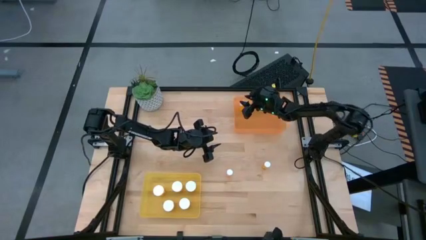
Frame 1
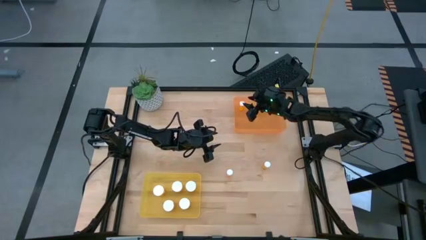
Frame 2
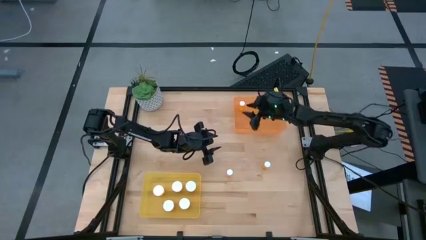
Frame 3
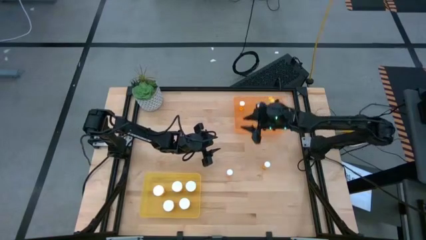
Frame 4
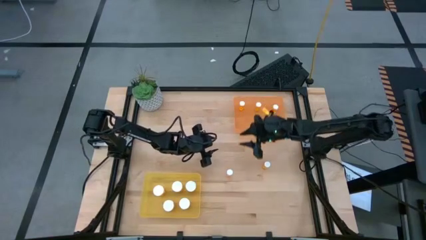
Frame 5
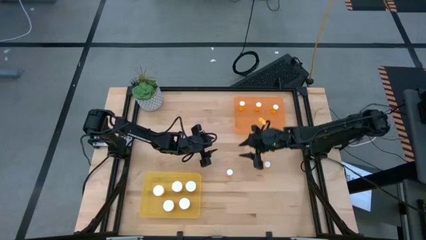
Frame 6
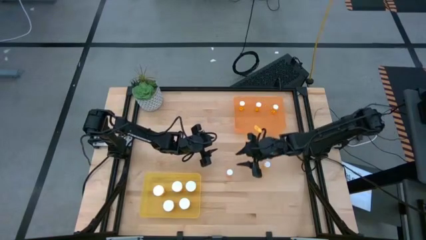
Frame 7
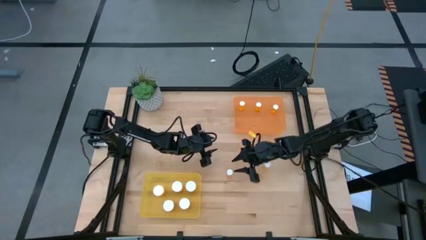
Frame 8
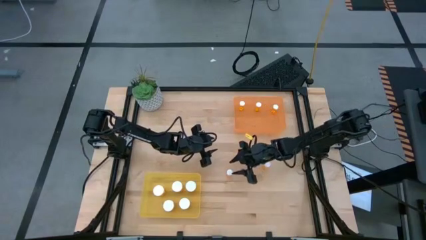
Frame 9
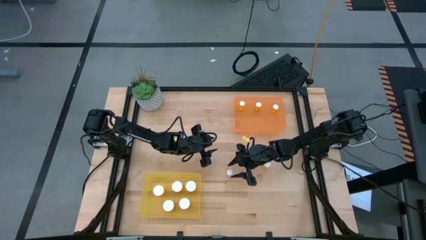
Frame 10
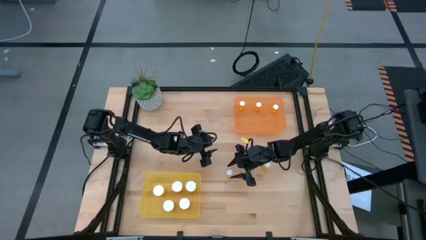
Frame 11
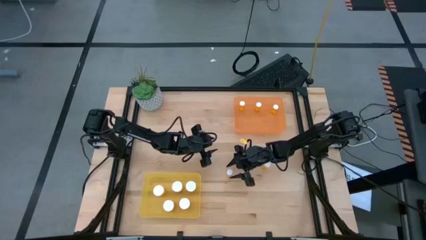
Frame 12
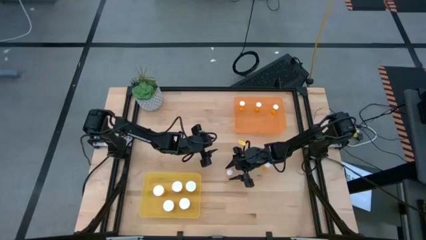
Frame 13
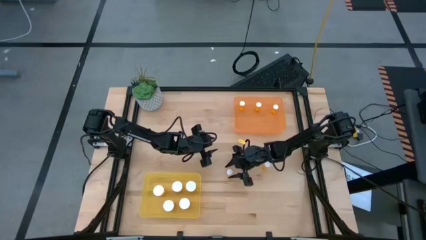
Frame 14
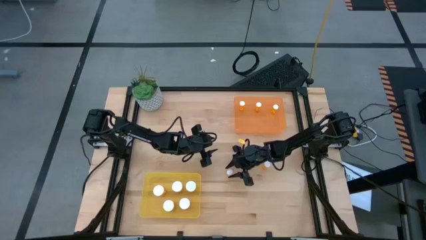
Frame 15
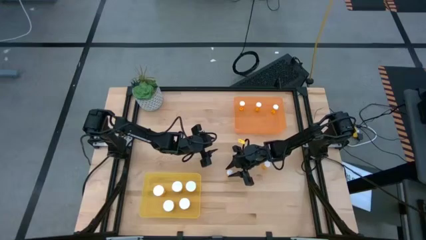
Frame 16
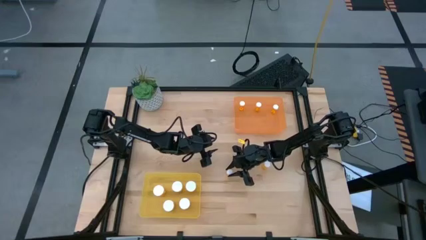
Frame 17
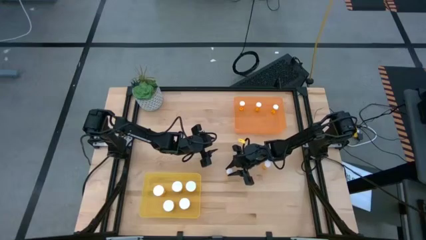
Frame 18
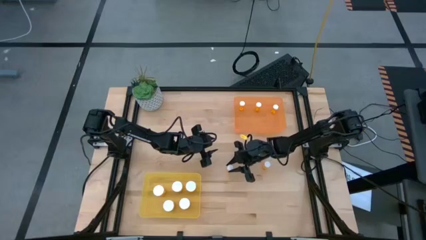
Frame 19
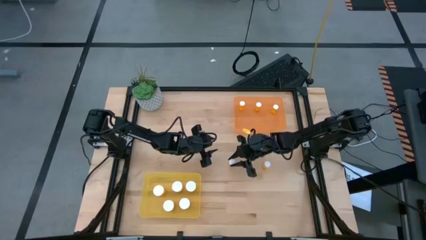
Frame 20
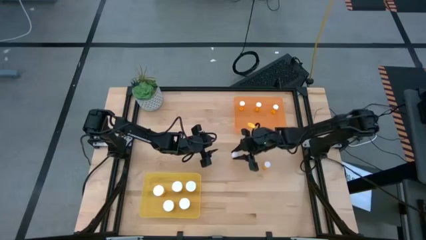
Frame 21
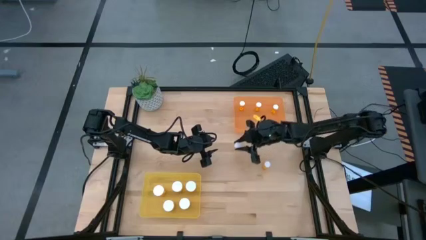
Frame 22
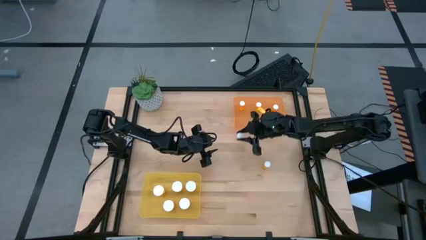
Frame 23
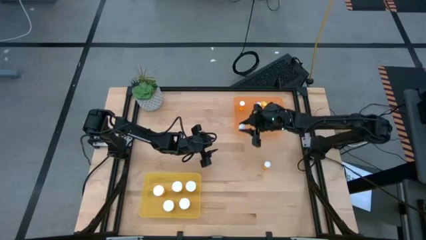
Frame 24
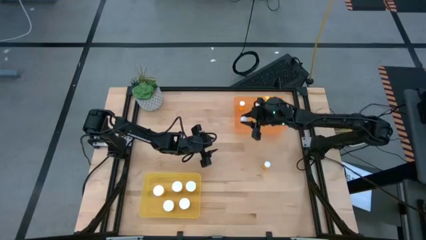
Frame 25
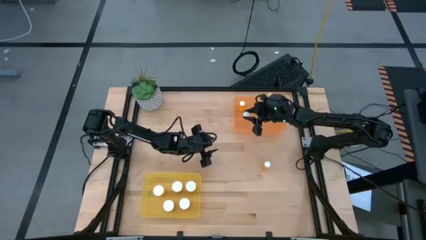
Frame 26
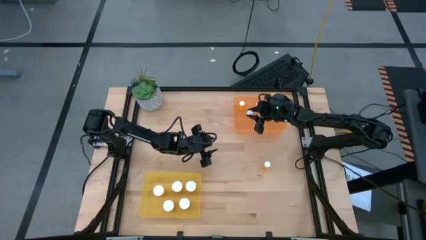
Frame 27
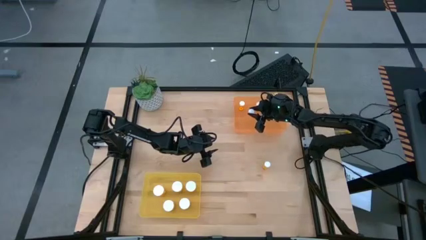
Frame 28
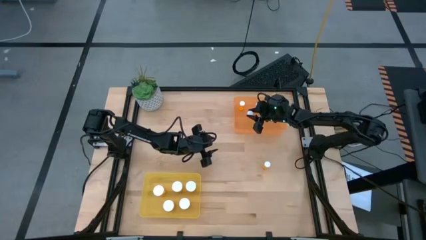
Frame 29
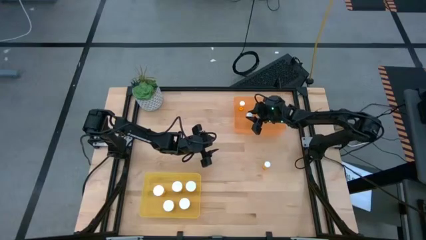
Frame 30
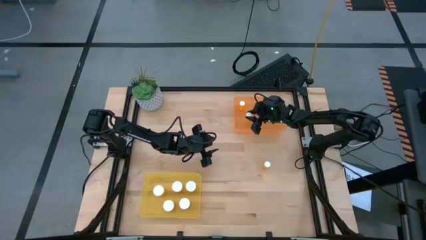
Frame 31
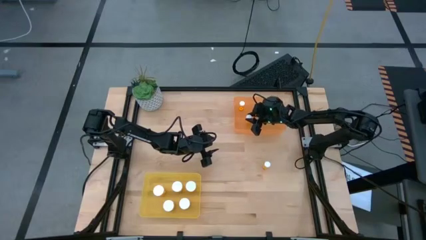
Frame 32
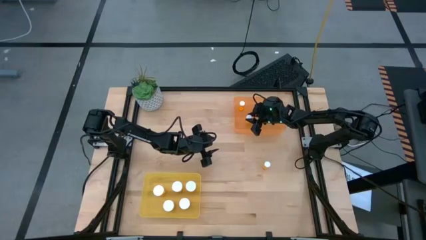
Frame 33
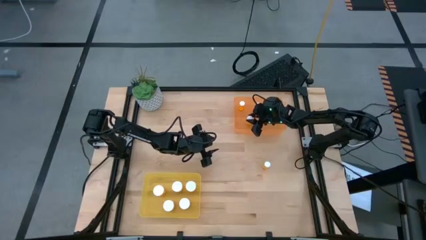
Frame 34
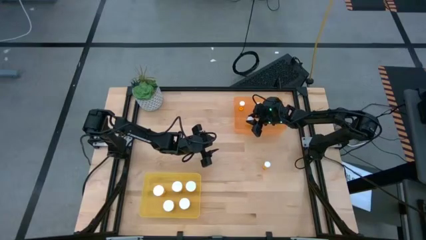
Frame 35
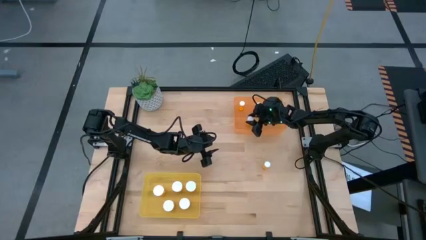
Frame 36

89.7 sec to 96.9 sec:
Task: Pick and place medicine bottles into bin by pill shape (circle, oval)
Put the small pill bottle into the orange bin

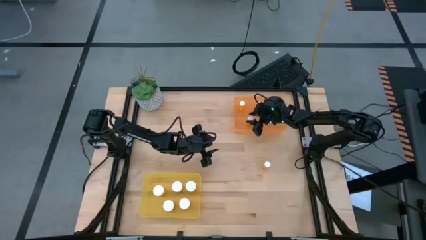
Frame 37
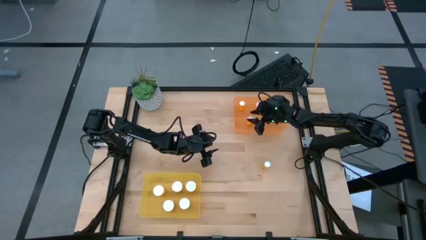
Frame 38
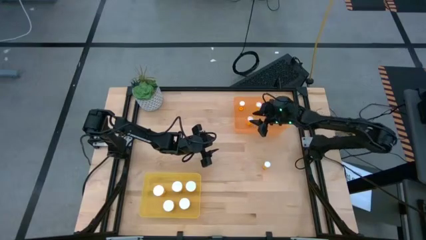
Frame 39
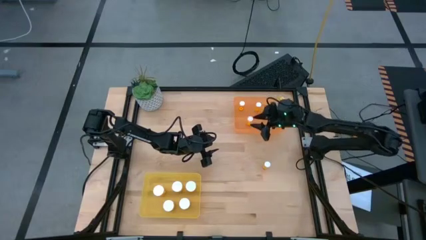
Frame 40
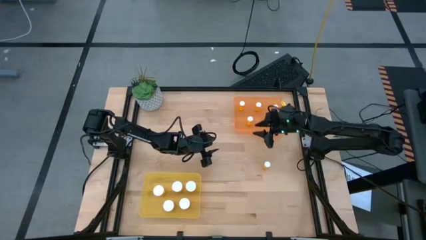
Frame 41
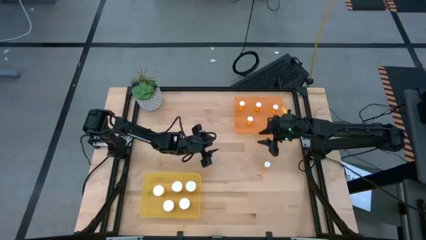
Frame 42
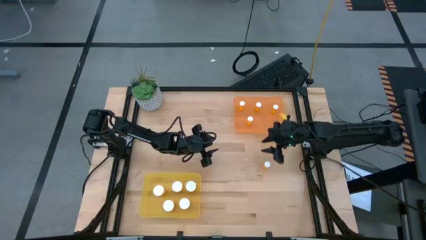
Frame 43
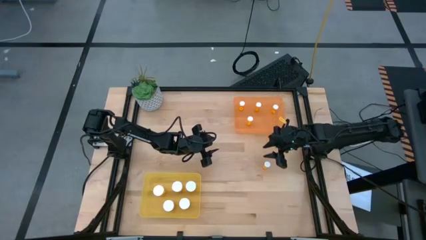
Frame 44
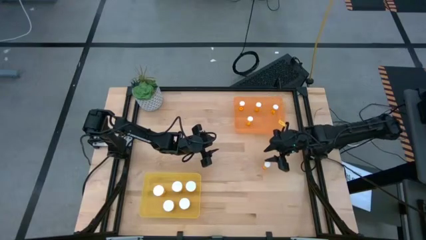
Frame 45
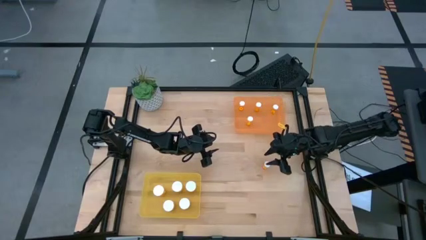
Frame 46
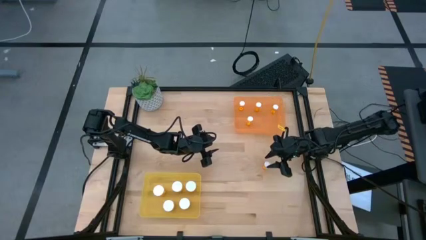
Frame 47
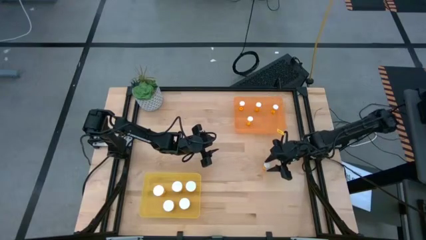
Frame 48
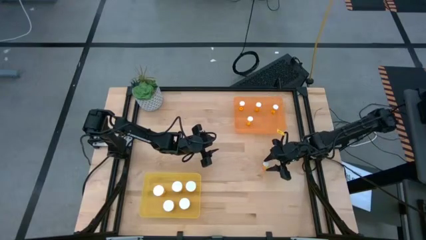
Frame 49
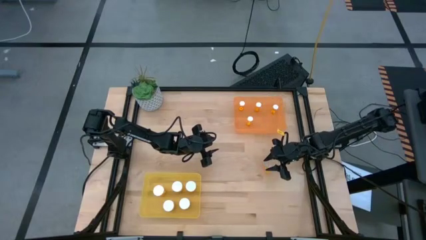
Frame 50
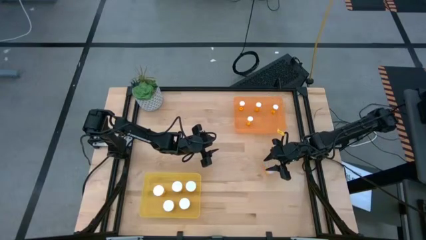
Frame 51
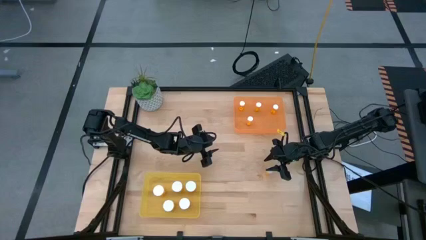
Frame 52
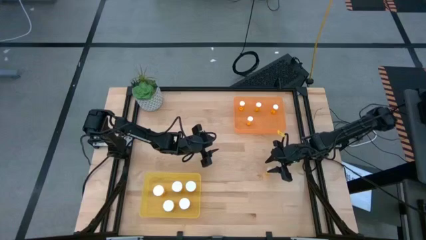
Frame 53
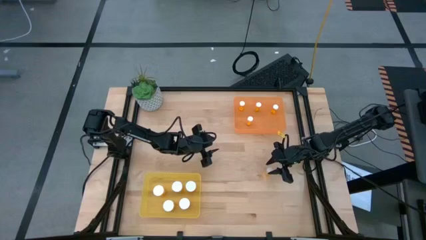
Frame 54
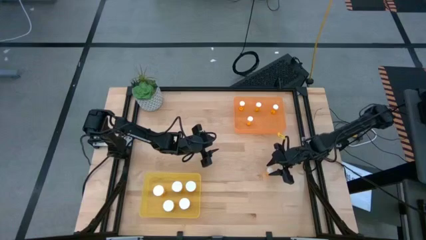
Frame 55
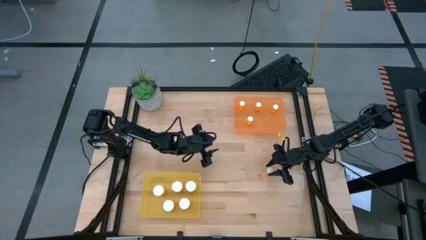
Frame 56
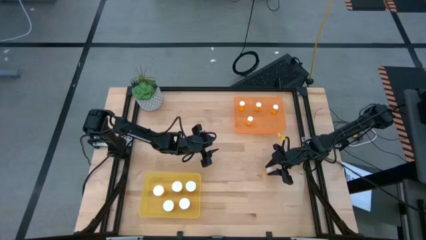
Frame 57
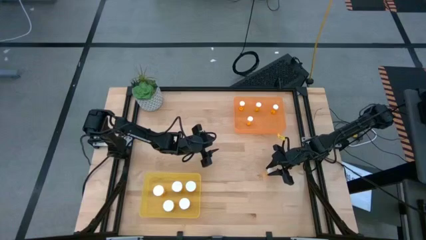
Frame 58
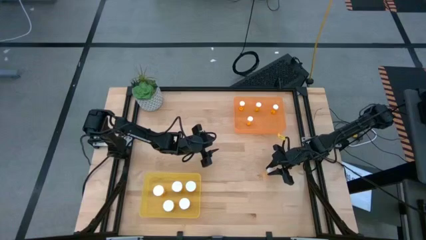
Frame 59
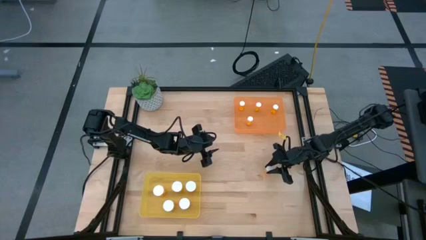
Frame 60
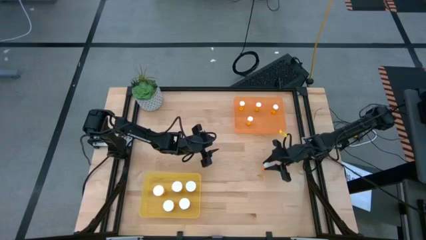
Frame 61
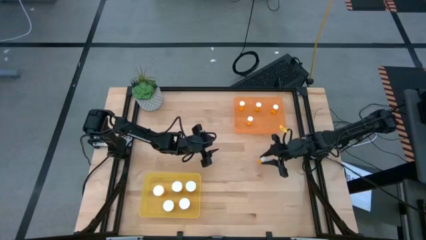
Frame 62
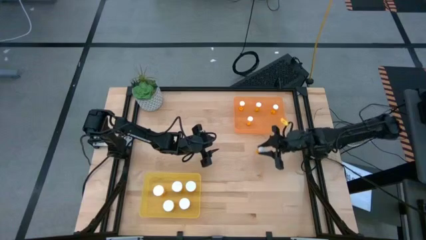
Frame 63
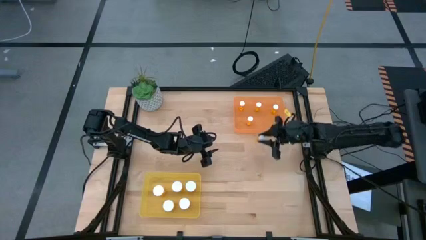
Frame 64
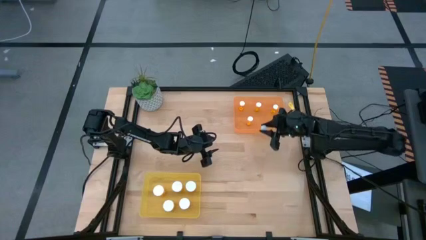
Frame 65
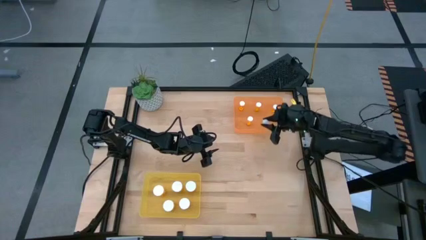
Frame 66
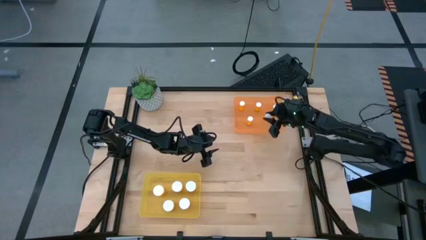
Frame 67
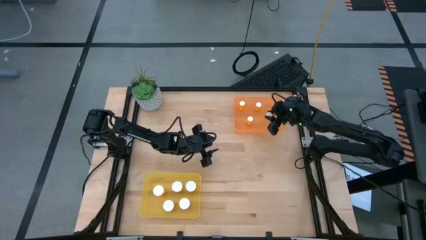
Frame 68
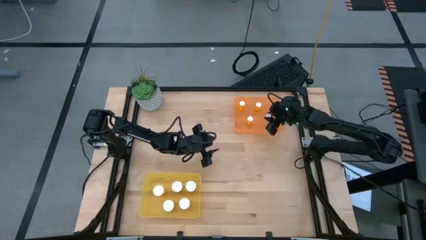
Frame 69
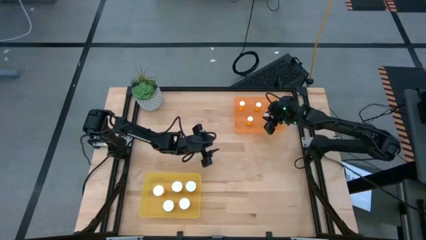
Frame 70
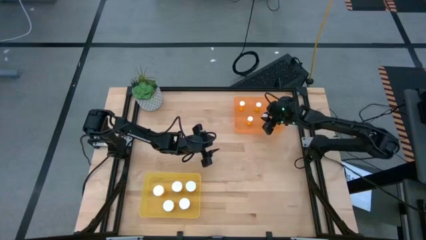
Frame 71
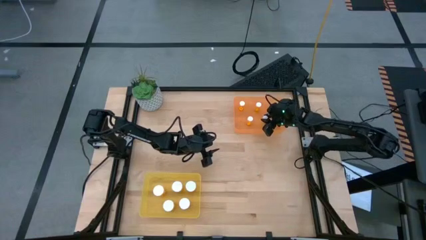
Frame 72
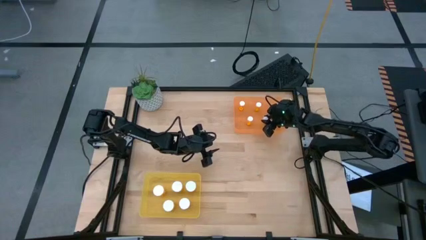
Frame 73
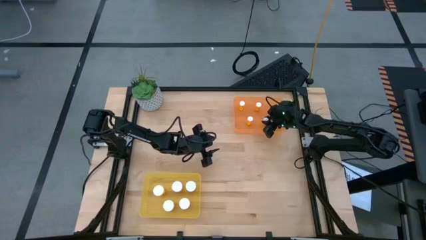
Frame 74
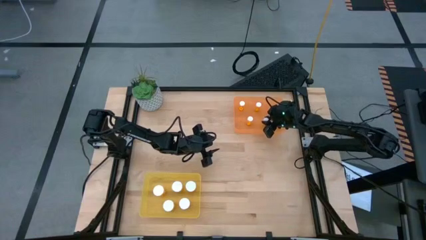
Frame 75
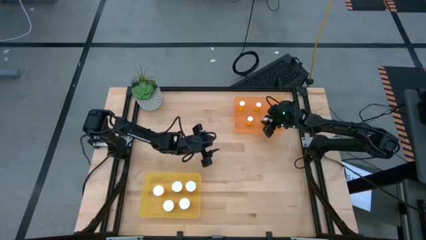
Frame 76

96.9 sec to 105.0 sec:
Put the small pill bottle into the orange bin

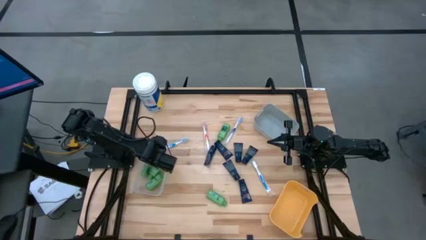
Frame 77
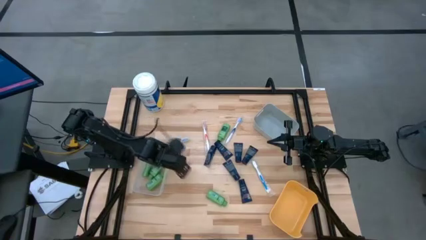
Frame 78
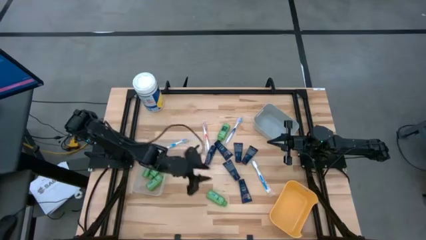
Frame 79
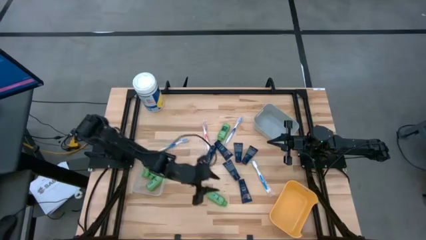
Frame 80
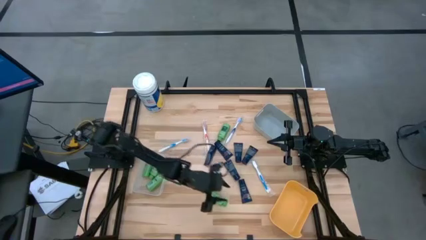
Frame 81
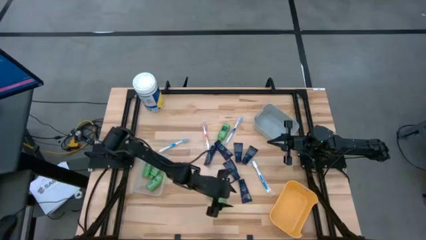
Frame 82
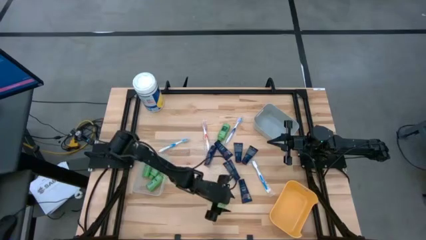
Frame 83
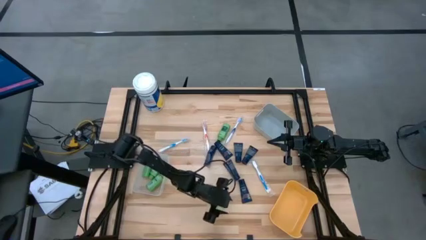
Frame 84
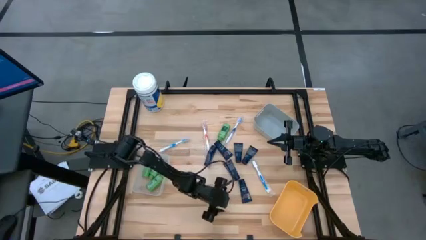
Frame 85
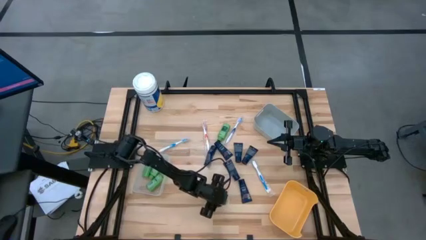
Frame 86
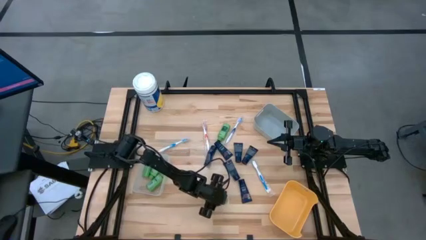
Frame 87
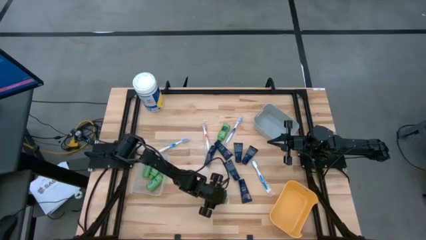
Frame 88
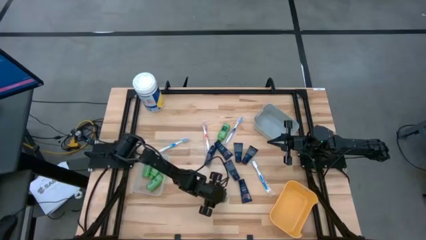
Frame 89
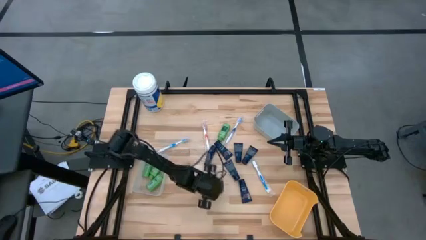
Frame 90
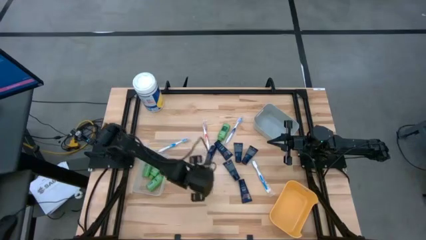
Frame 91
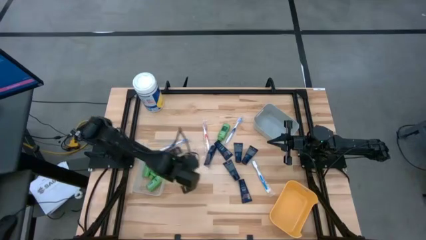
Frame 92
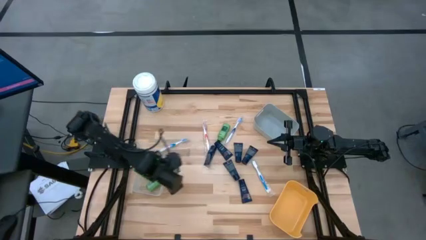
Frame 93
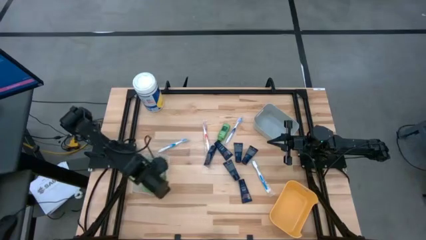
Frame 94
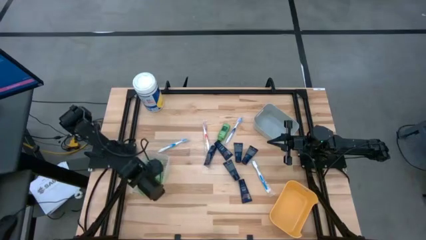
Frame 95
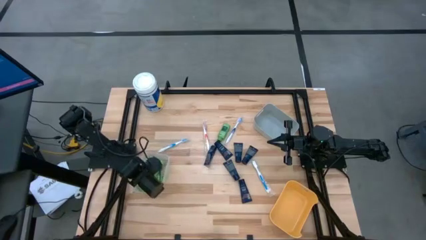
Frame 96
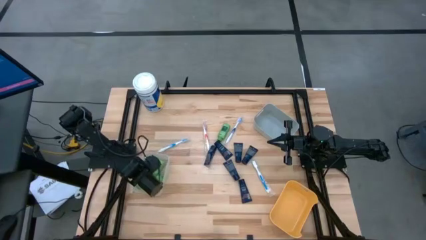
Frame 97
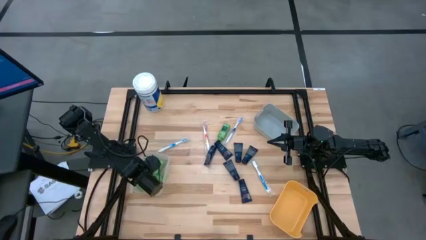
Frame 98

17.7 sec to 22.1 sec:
Task: Pick & Place Travel size toiletries
Put the green shampoo bottle into the transparent bin
